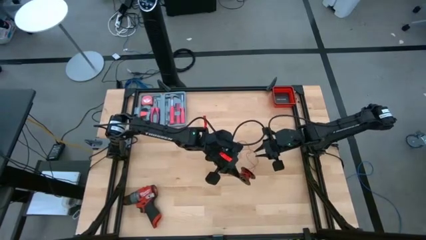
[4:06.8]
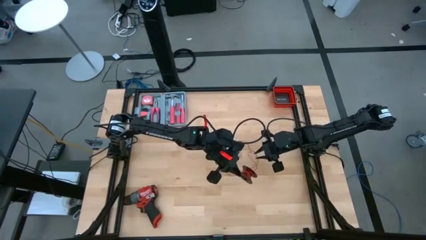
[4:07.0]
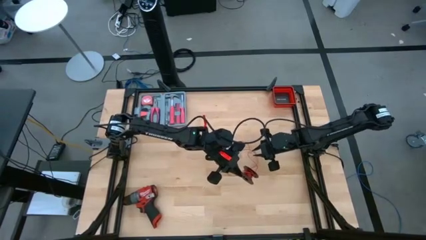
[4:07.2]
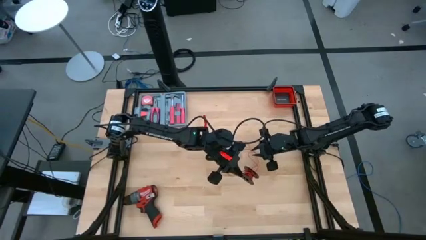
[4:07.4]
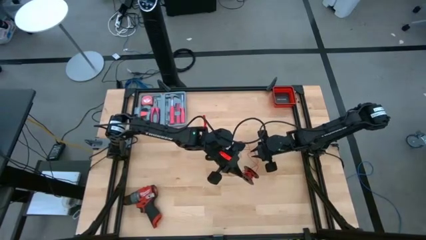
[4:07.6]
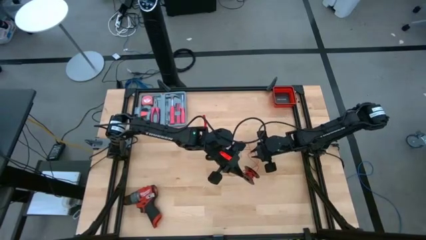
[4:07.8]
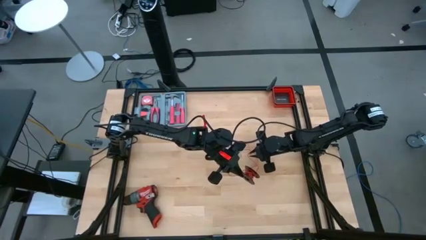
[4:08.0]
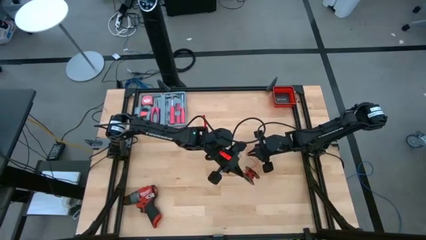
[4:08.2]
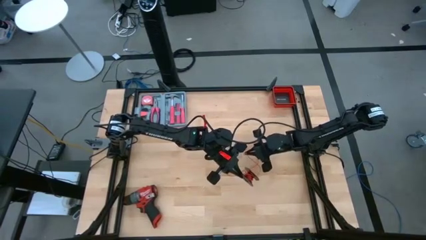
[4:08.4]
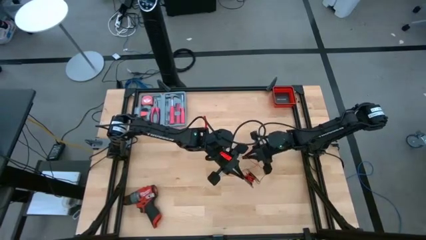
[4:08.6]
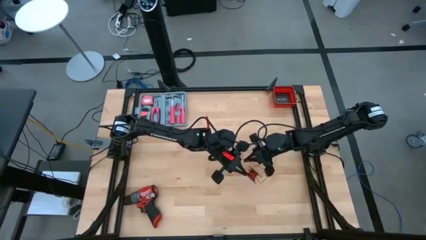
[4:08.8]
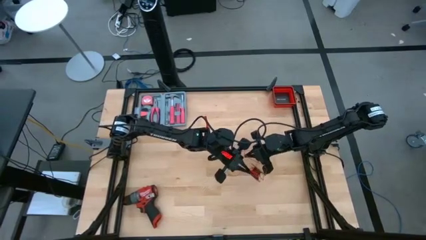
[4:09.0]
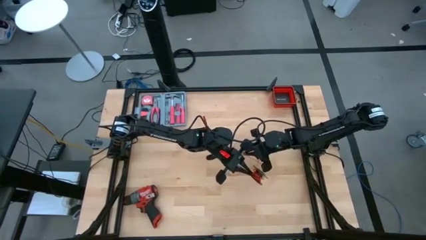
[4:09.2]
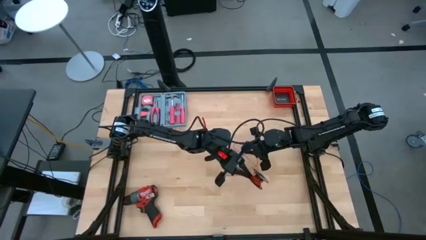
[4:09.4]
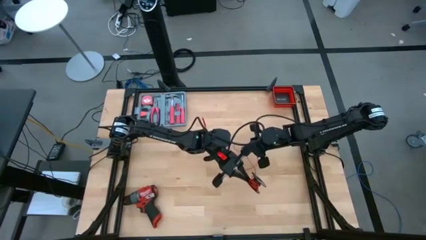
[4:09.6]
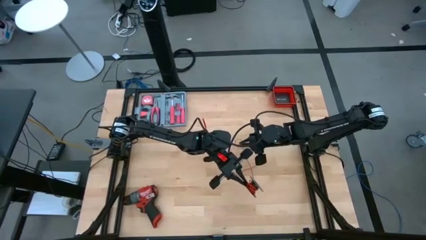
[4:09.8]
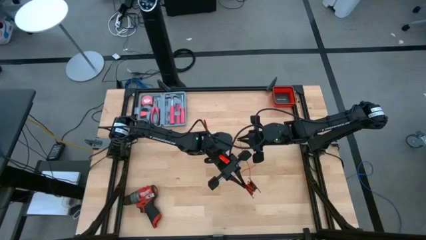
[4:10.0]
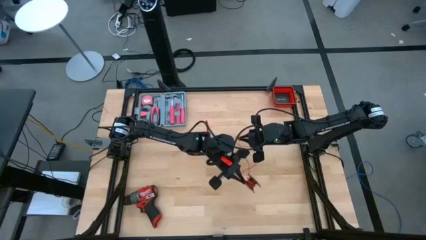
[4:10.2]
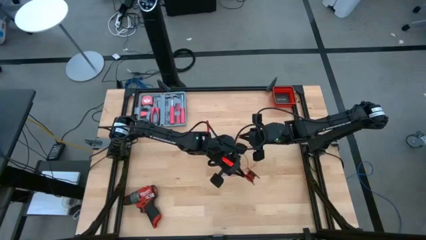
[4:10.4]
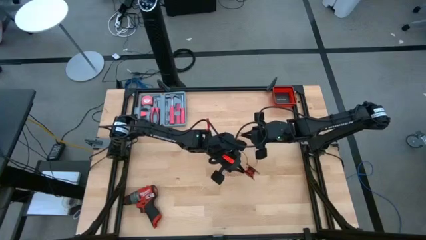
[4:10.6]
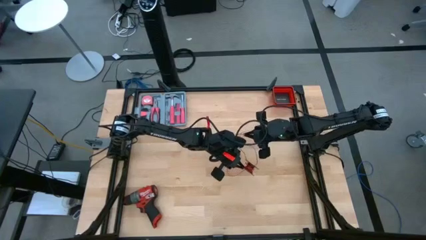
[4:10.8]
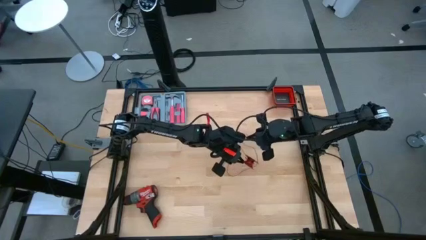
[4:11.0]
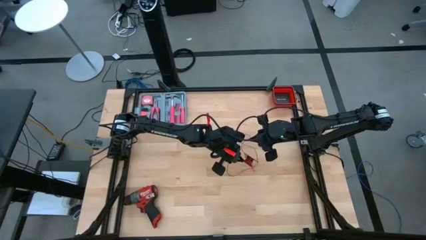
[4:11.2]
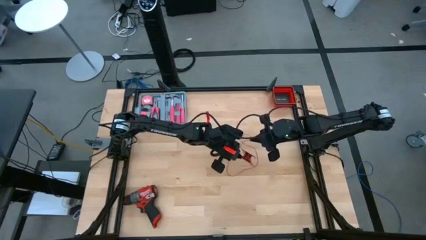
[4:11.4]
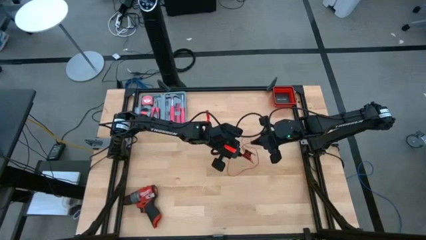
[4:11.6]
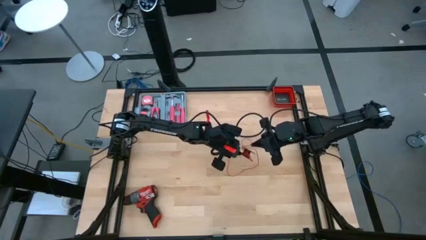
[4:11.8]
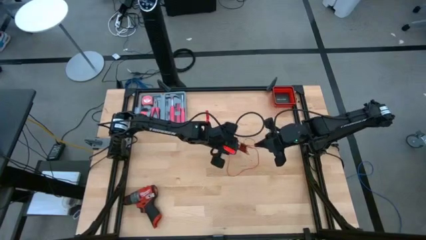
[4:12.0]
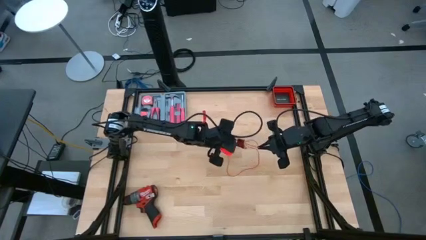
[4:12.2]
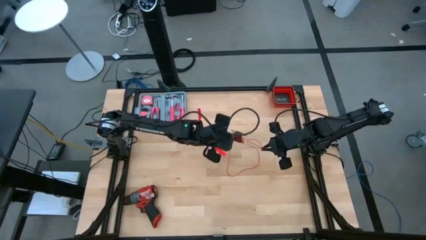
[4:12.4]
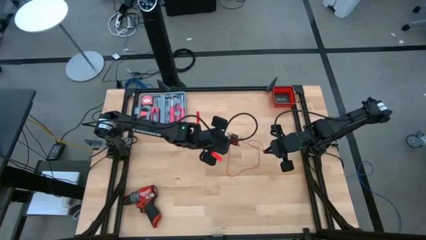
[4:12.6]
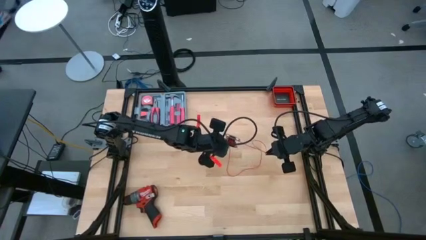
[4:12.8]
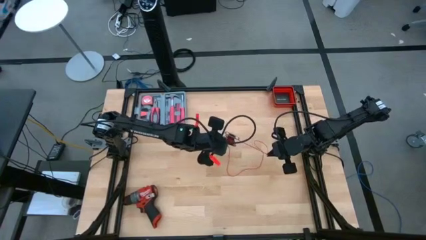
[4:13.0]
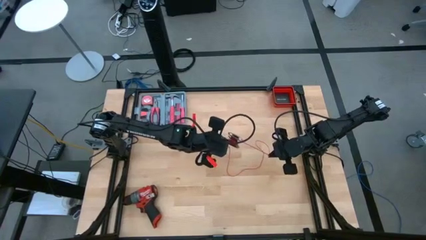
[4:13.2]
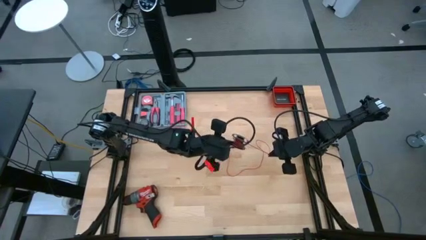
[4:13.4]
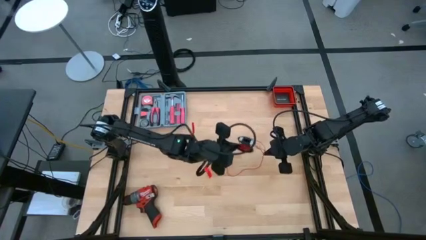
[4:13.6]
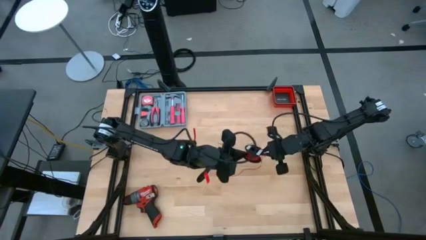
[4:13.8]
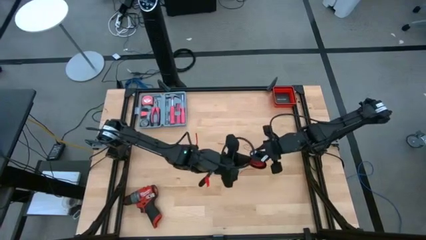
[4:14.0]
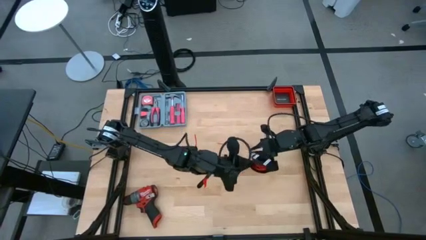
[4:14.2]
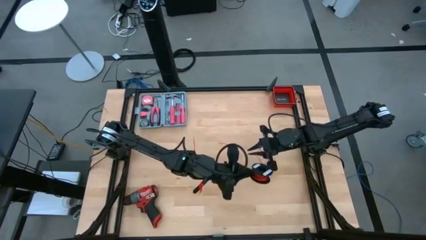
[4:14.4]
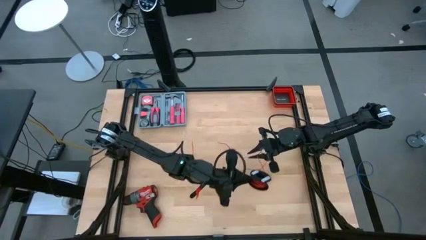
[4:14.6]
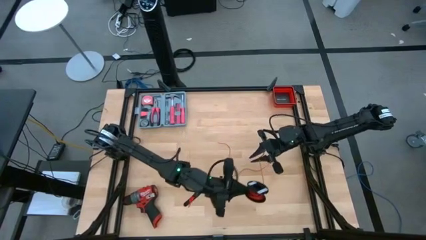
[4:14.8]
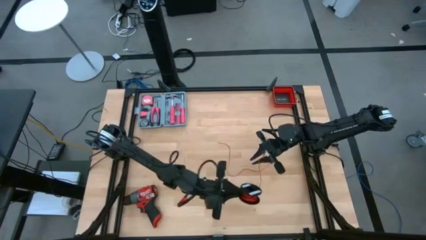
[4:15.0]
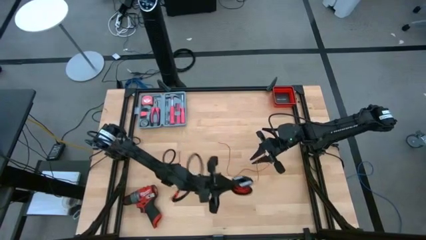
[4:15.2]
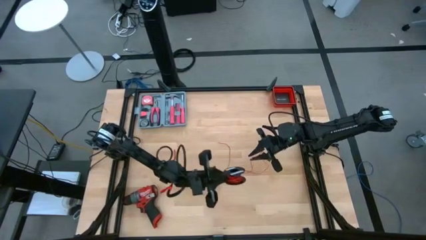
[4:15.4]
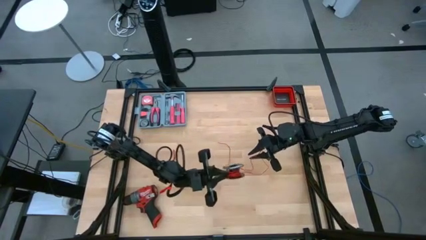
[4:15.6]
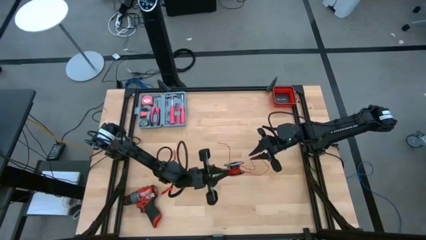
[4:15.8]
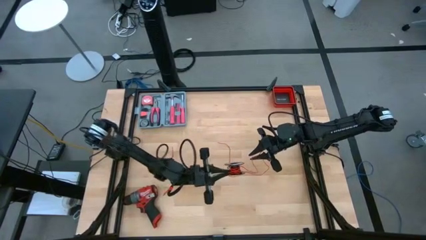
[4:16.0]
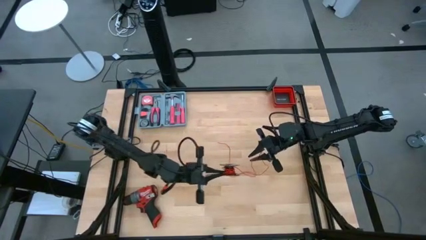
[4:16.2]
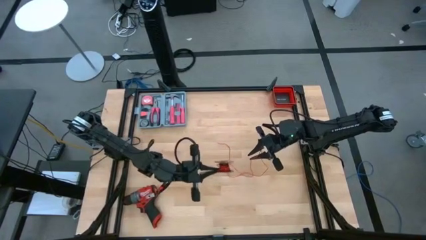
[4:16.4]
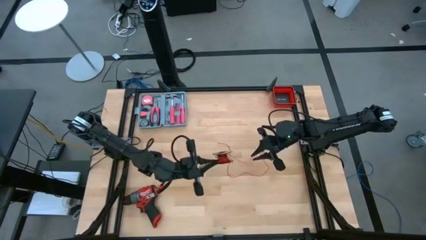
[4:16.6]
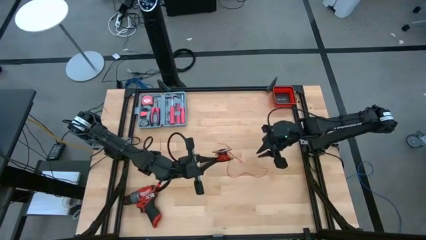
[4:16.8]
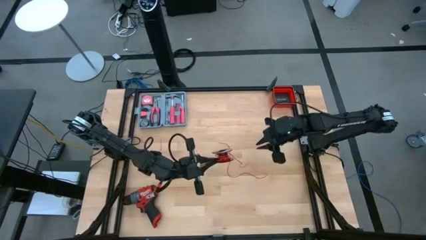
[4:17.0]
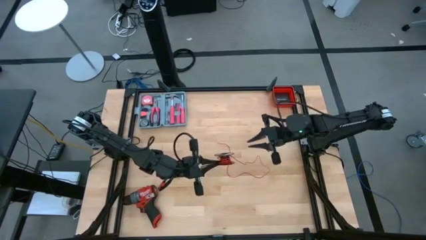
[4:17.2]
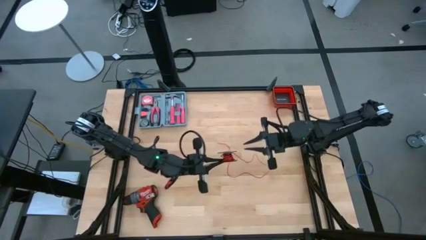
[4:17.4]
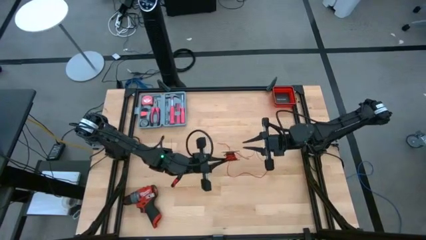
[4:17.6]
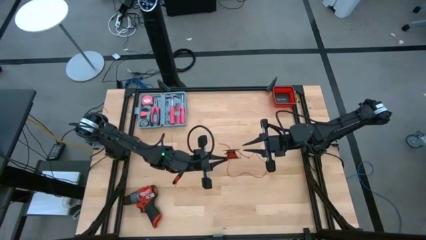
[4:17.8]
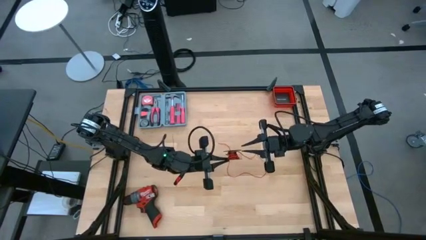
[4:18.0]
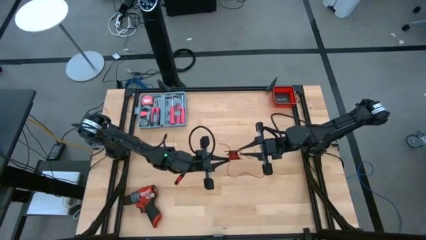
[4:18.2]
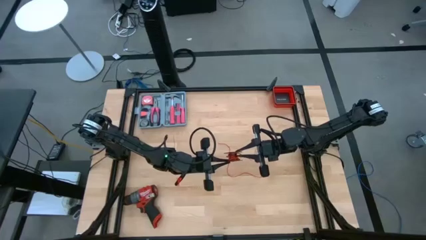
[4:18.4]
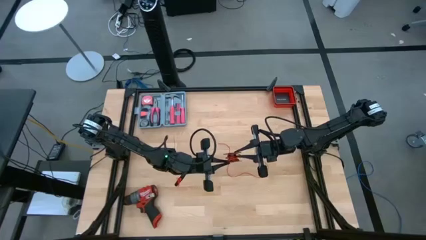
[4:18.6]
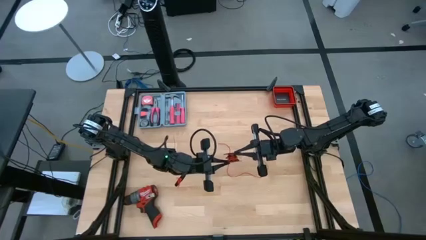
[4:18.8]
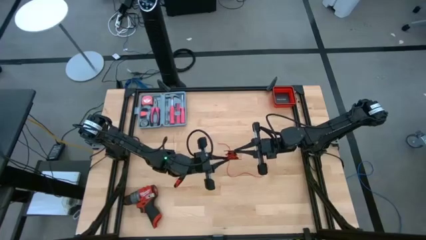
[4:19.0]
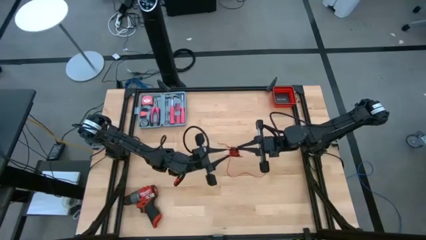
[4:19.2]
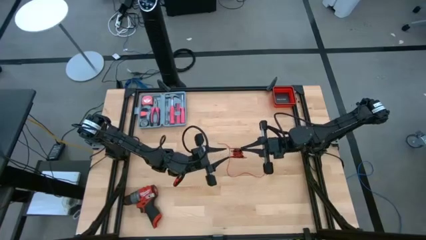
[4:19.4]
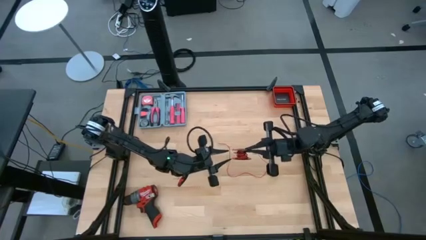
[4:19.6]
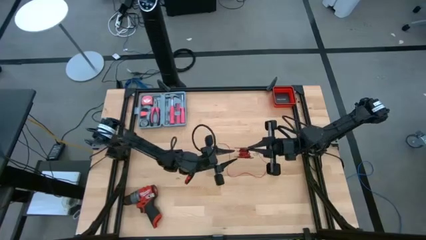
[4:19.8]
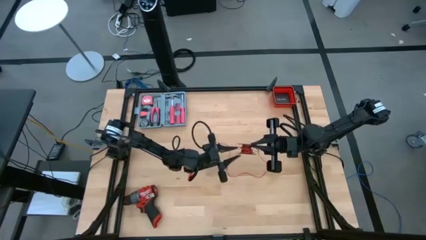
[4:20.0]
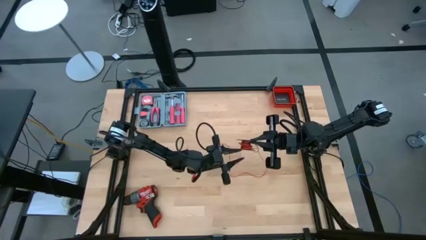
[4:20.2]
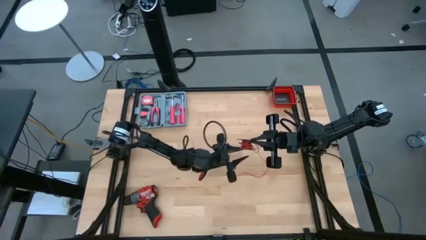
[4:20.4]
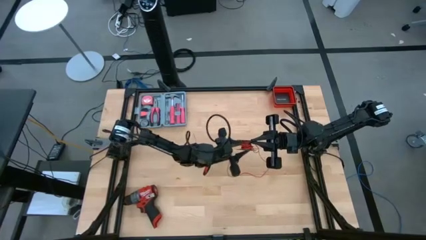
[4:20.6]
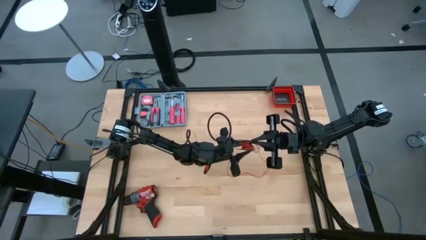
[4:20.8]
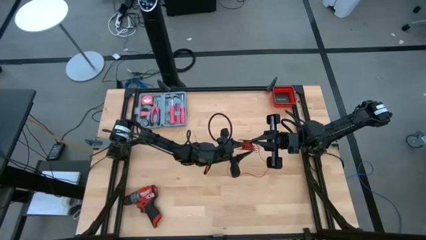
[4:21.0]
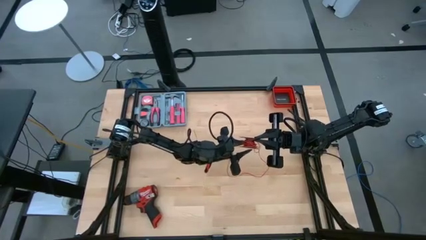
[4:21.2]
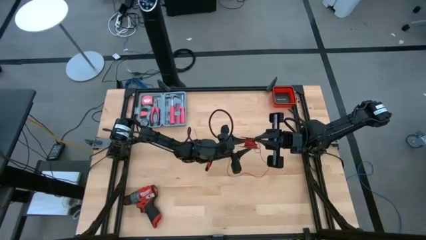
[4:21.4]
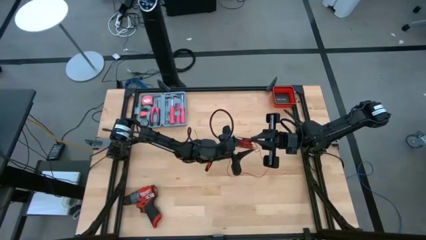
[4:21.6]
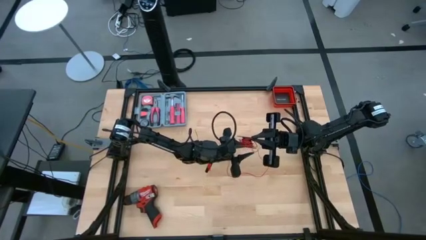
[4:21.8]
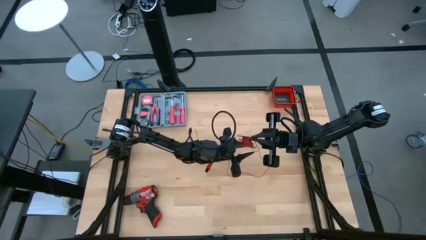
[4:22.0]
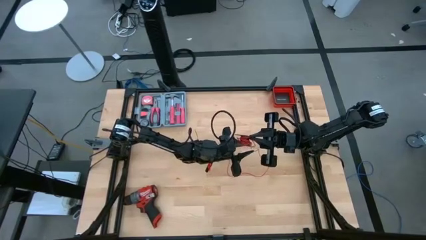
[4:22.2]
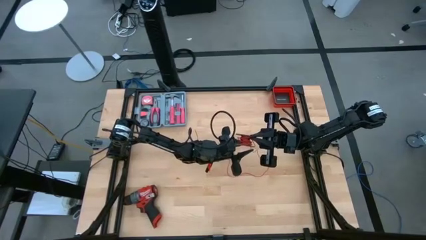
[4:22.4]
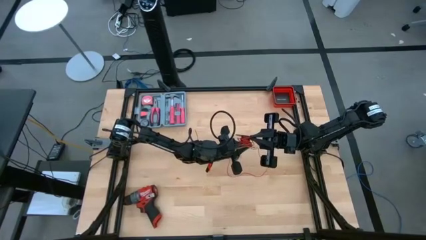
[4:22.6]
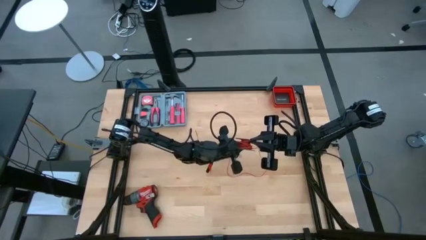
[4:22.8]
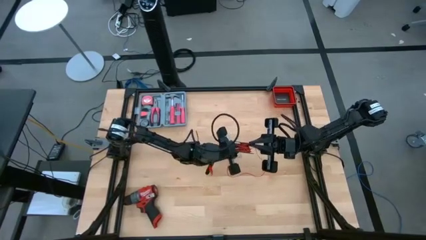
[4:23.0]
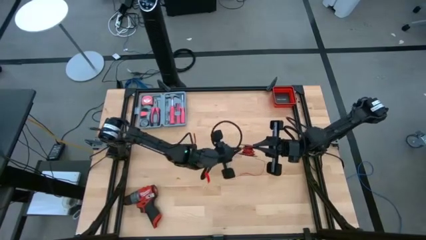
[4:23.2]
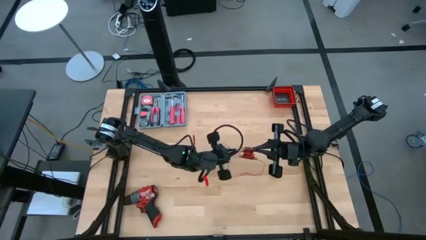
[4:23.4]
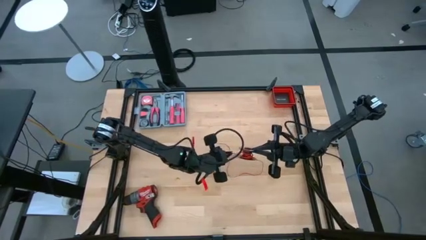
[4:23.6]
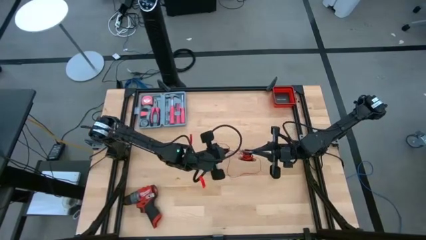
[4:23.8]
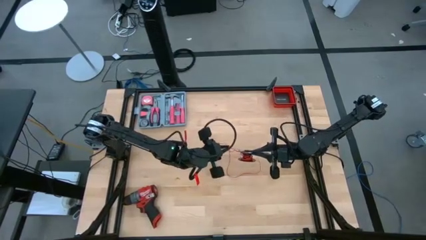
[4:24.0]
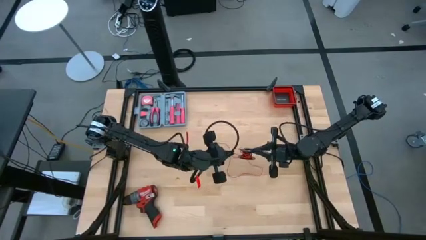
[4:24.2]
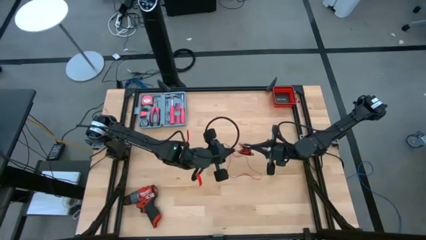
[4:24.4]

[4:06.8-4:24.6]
Task: Coil cords
Coil the red wire on the black spool
